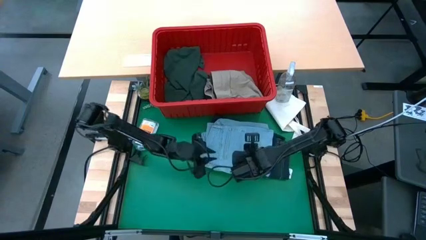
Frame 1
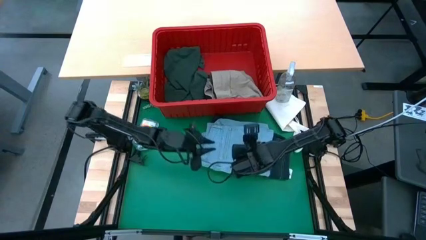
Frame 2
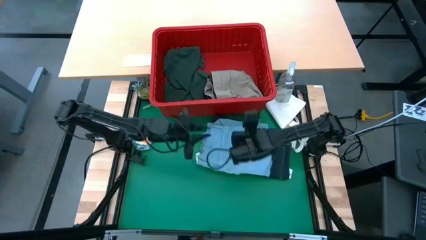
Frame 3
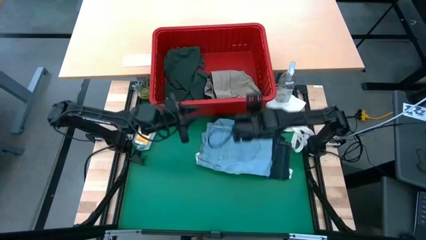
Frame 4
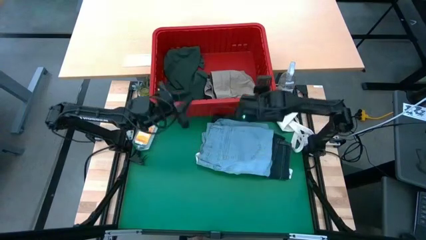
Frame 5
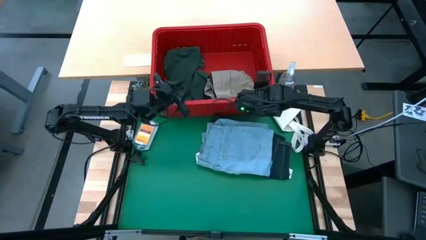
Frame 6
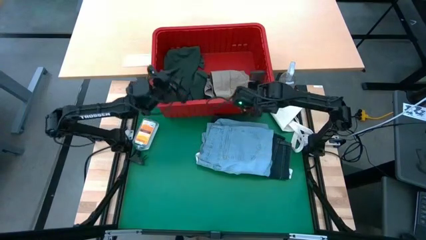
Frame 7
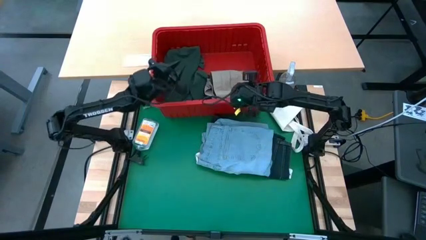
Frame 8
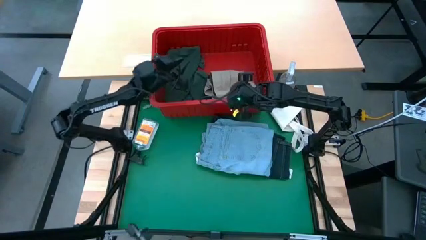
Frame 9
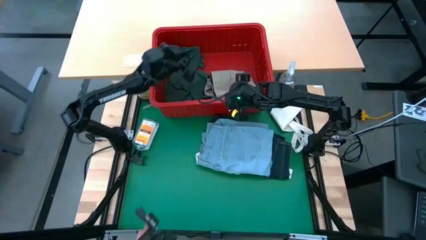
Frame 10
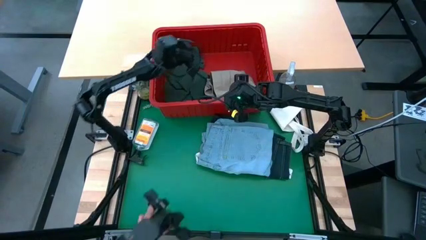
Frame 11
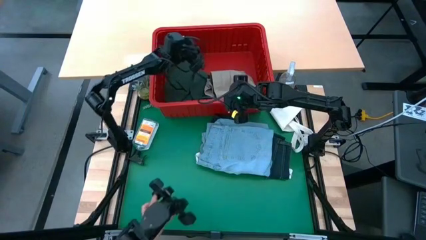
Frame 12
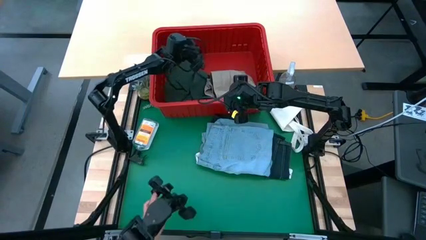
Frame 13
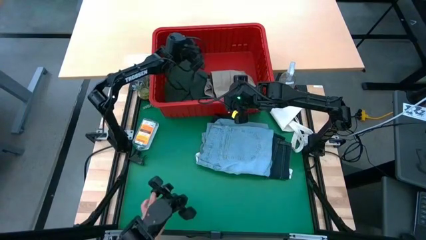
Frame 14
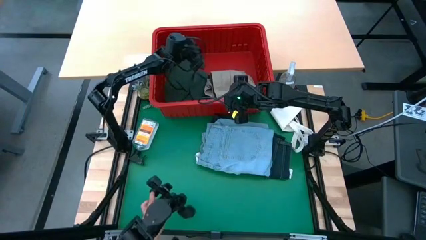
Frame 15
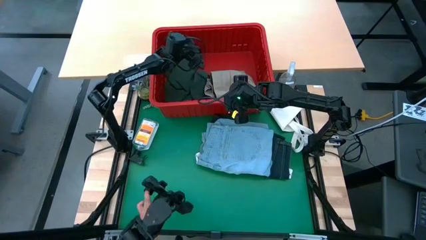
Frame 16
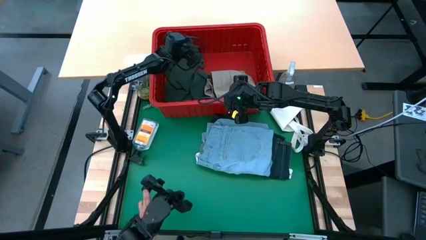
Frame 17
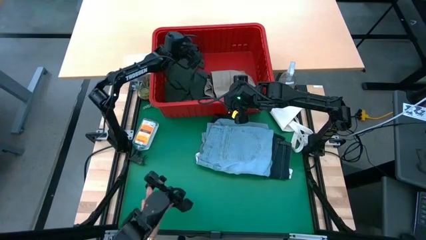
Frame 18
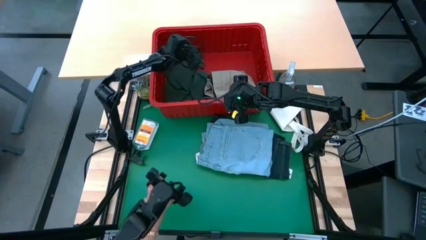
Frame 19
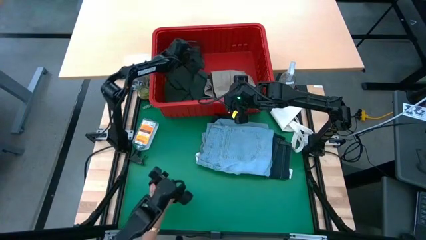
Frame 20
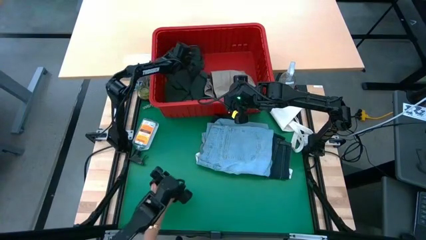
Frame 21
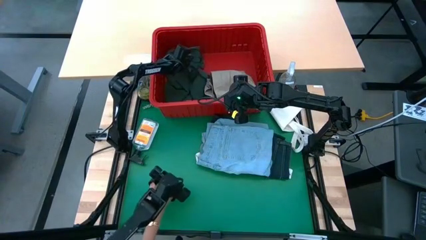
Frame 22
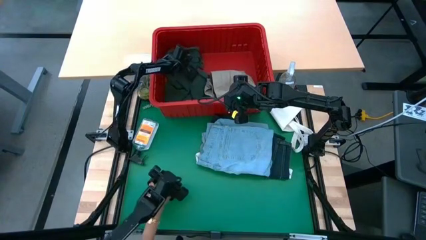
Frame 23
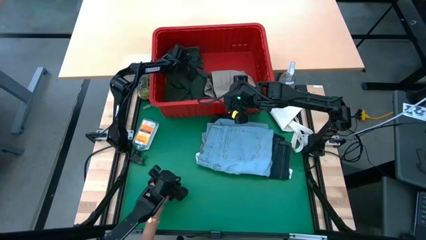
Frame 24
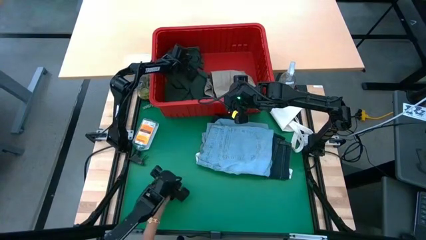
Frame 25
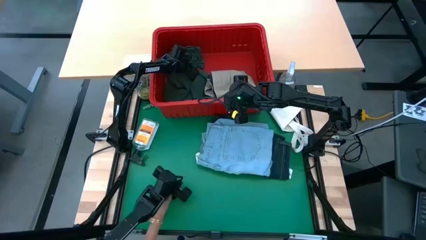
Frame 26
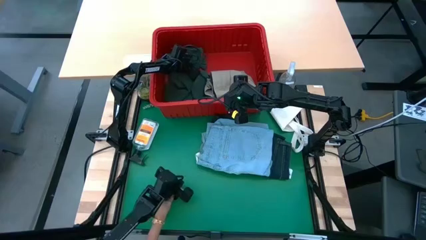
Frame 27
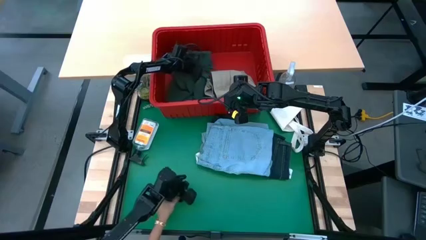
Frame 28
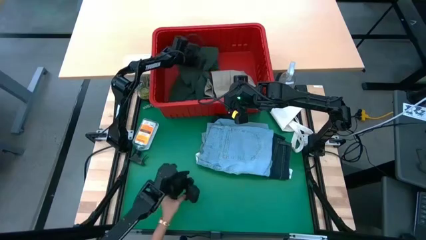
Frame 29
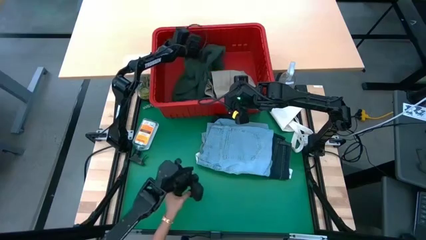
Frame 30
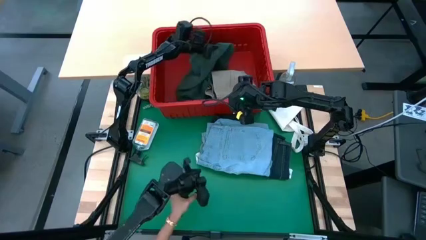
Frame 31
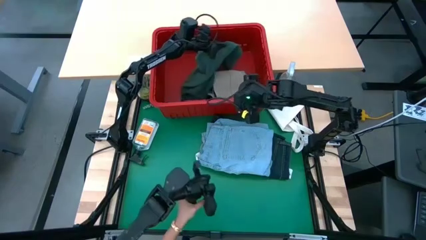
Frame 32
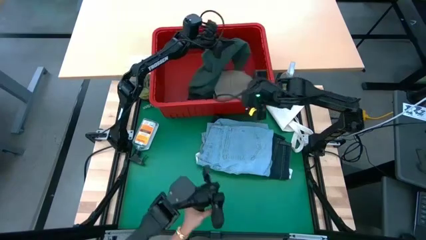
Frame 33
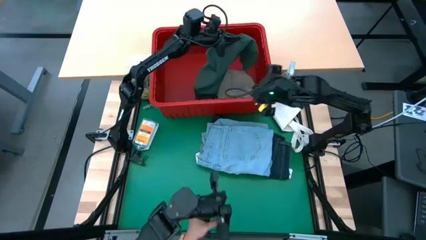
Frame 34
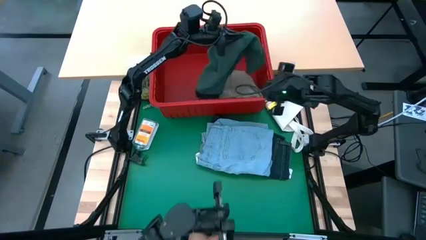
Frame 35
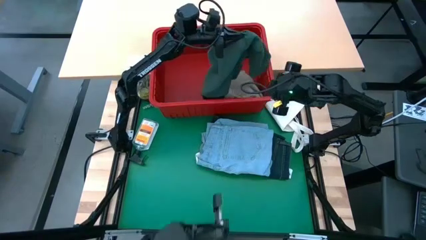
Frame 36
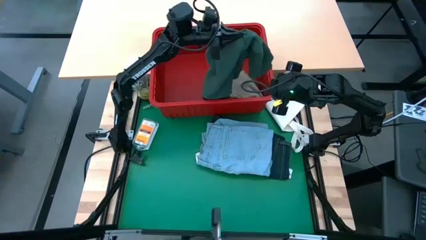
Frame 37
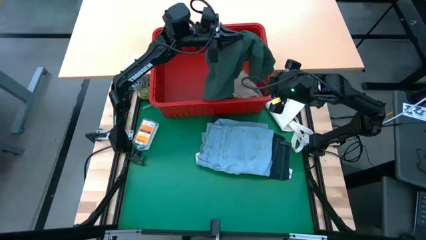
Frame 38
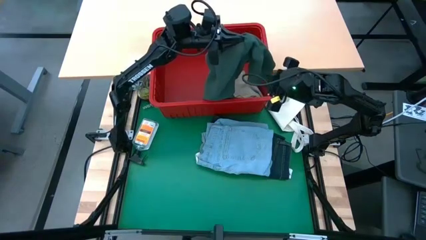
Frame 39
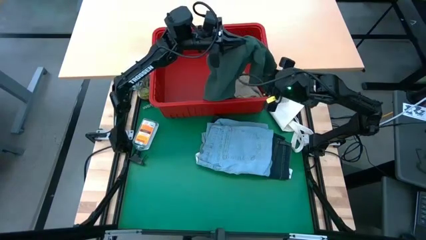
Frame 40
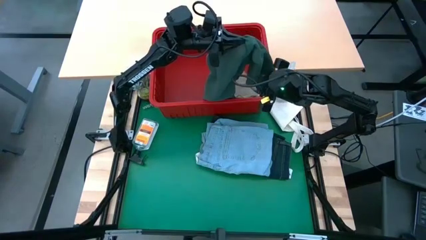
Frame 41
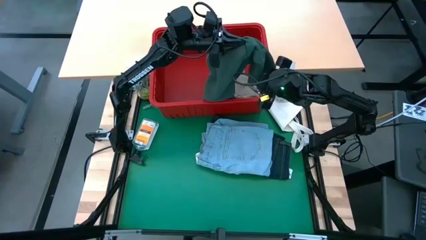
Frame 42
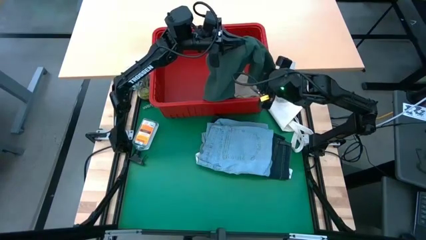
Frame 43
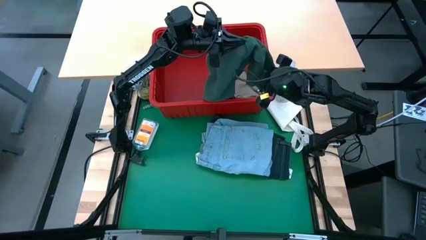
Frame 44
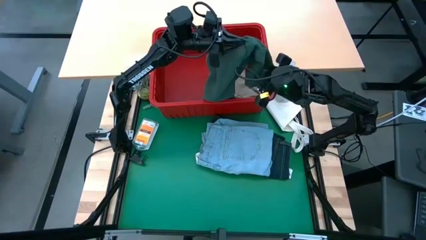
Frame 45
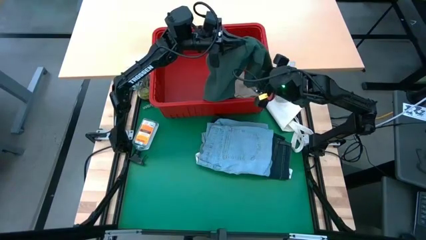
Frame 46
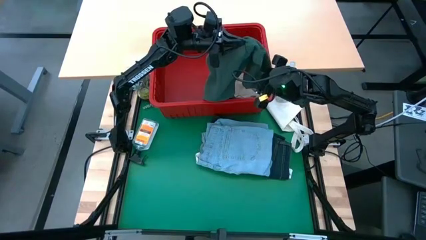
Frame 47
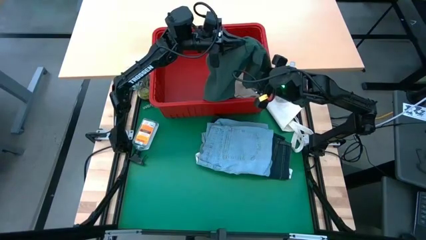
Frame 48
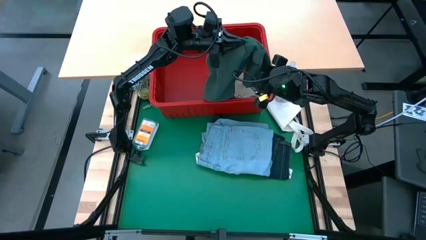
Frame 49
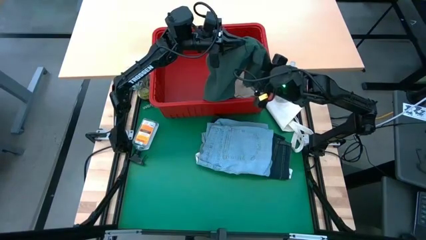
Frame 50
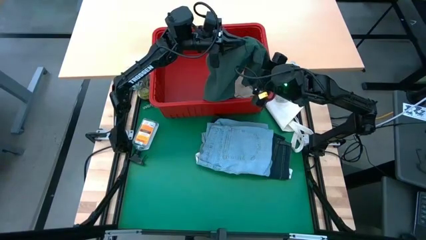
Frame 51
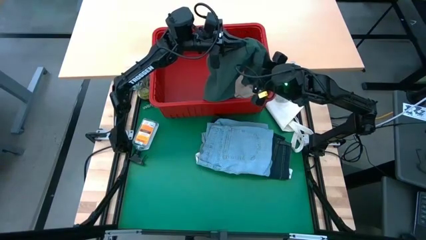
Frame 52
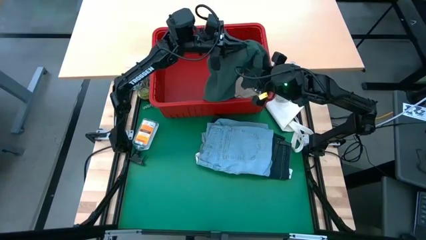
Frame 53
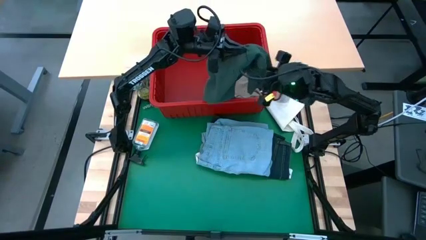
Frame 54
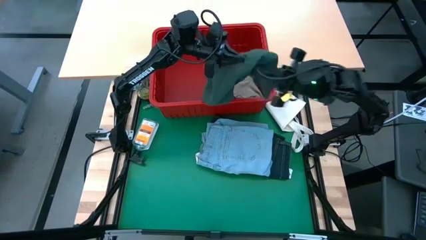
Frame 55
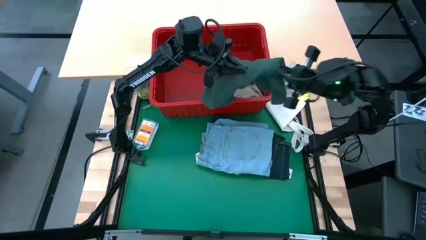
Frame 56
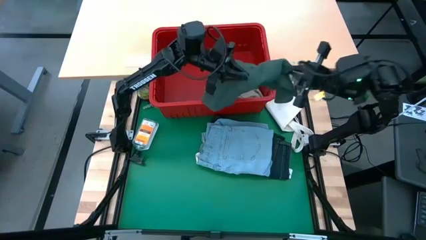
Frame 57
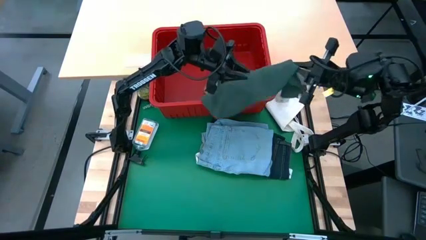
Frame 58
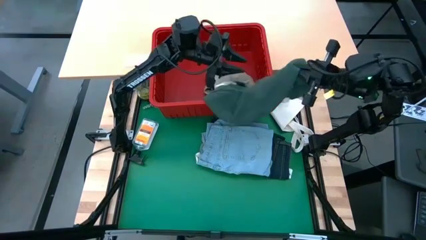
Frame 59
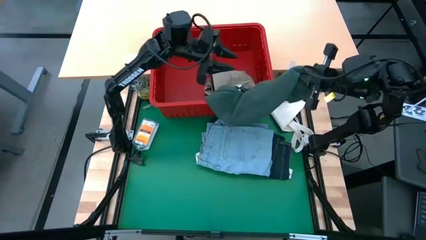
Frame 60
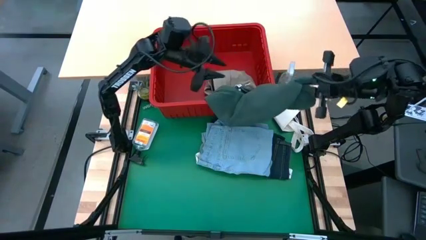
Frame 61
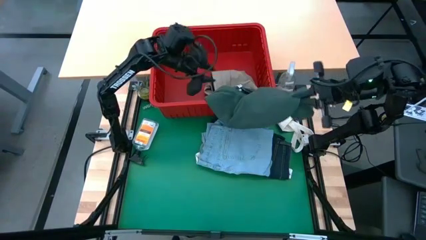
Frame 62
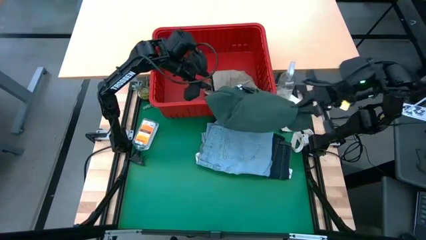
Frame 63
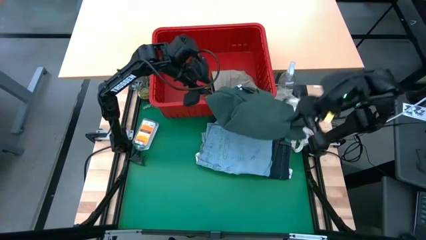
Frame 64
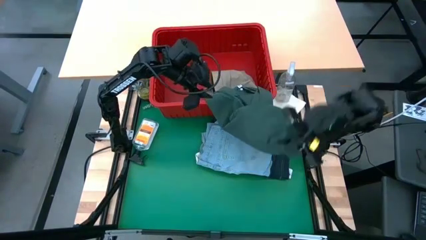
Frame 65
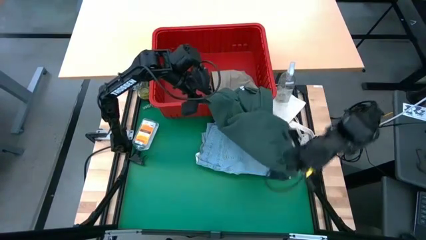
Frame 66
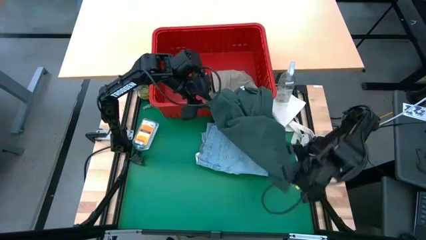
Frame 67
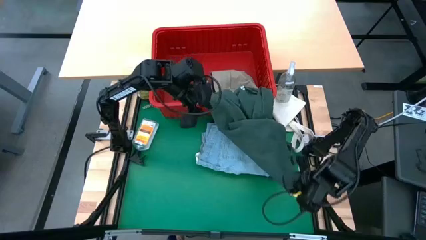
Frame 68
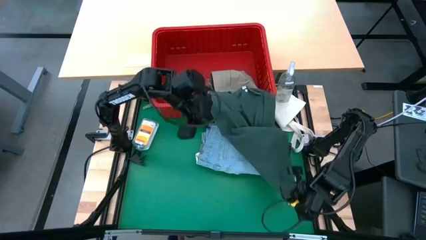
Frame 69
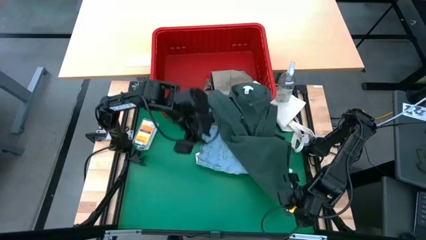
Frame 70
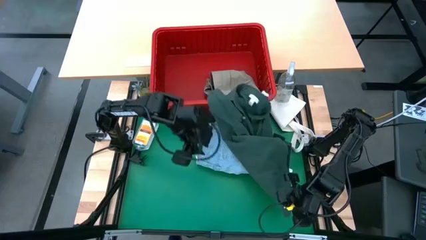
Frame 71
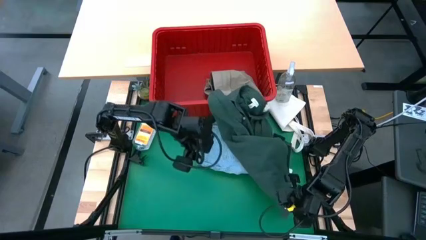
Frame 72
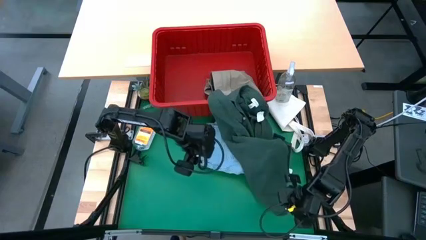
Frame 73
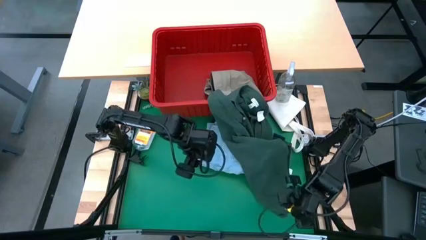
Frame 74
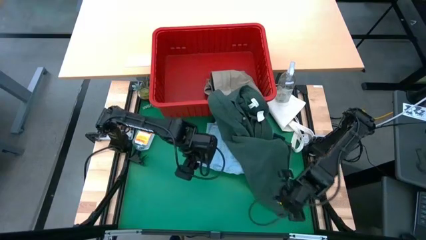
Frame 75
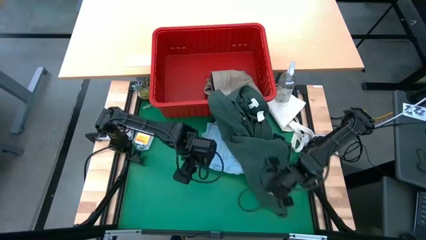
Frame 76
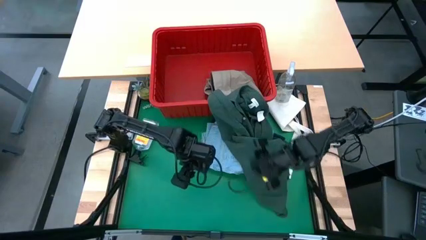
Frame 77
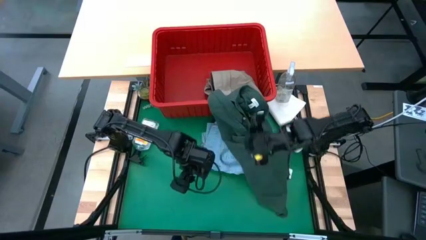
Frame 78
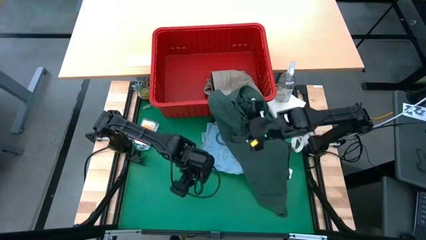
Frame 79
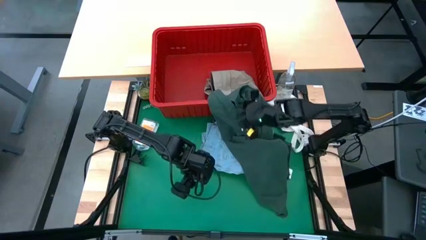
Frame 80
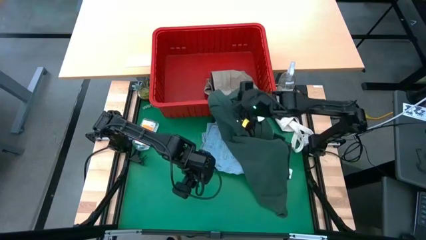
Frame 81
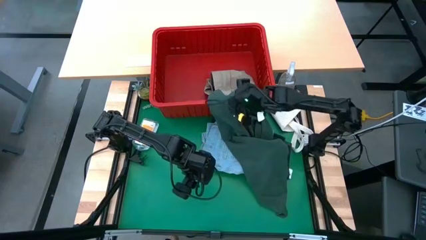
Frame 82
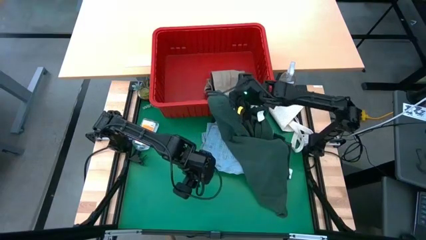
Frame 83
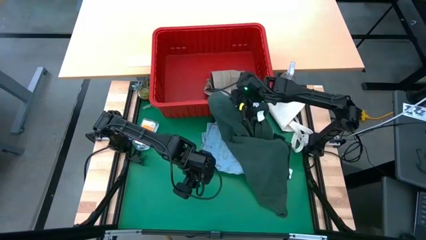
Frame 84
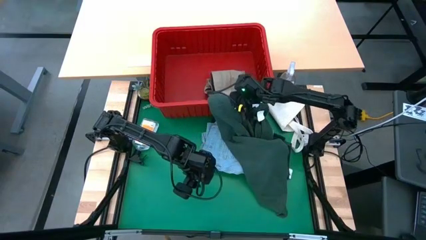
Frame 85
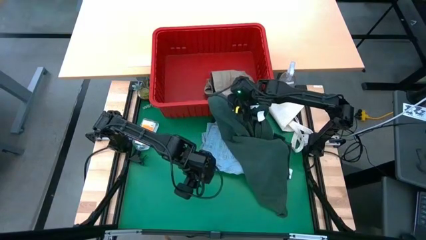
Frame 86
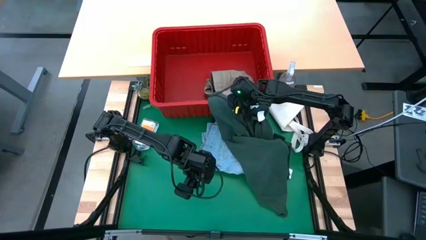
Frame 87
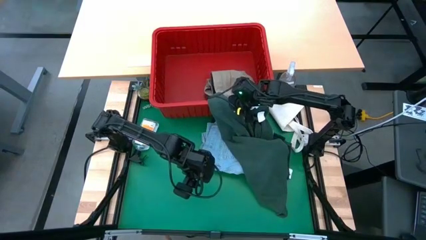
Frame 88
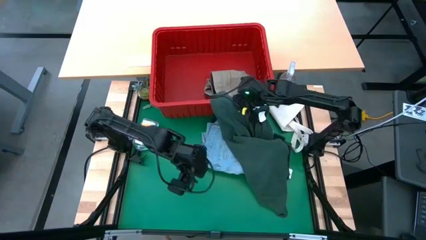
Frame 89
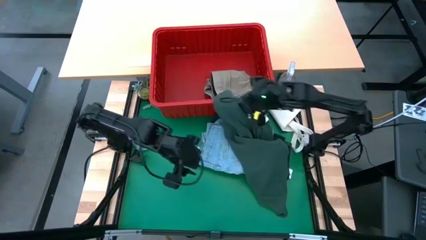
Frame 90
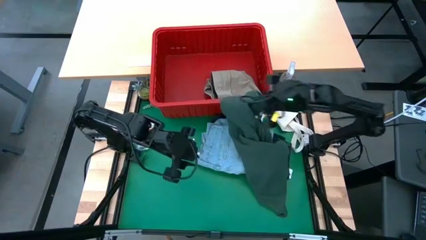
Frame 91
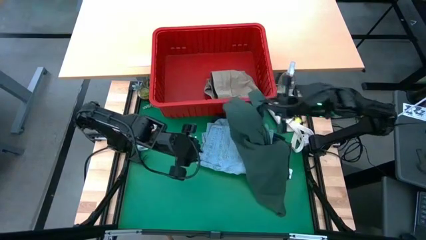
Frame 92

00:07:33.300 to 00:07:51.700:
Task: Fold laundry
Fold the green shirt
